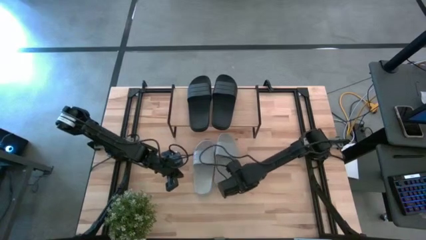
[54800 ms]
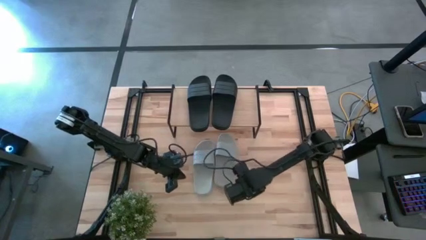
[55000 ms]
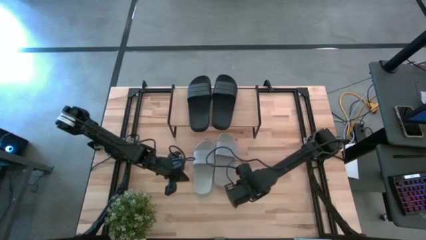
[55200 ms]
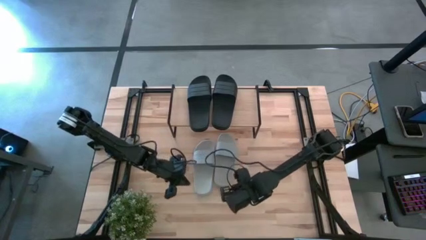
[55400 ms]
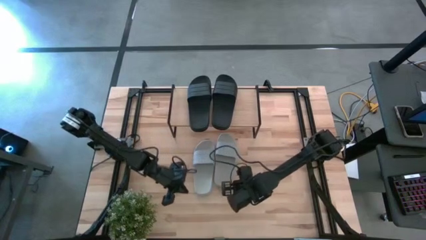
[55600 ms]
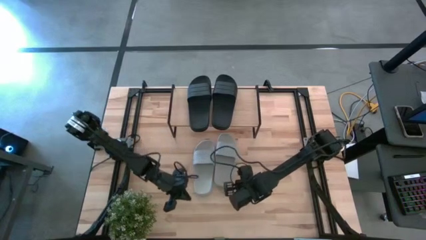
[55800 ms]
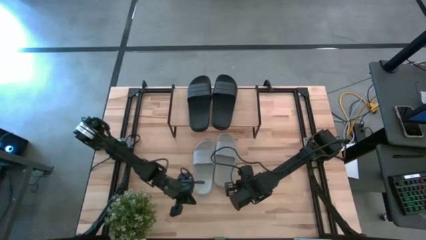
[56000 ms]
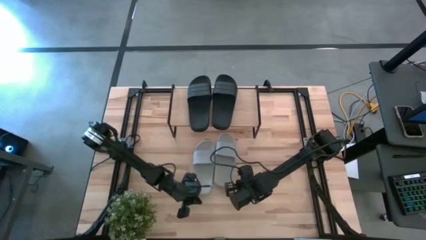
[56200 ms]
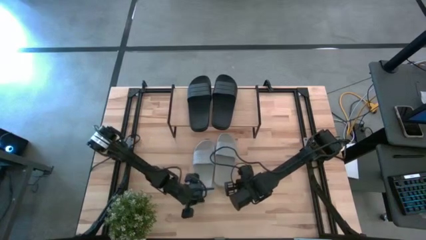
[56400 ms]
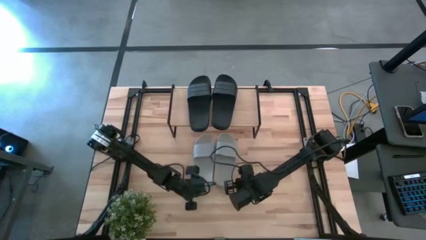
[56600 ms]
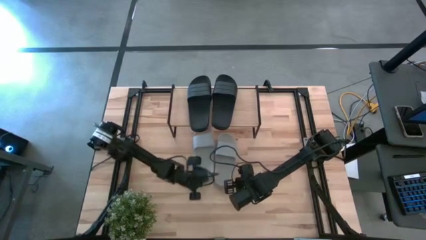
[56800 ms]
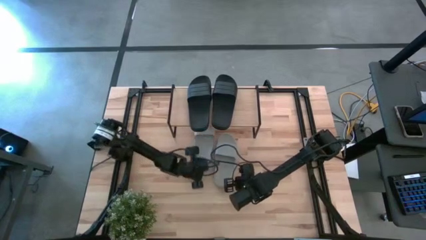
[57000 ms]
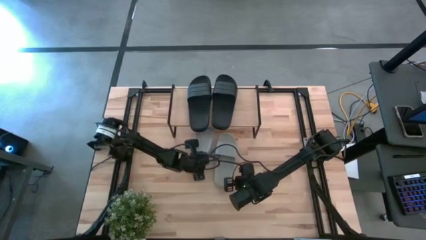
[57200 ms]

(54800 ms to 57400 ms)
Task: Pick and place slides into the shelf
Move the left white slide to the top center of the table

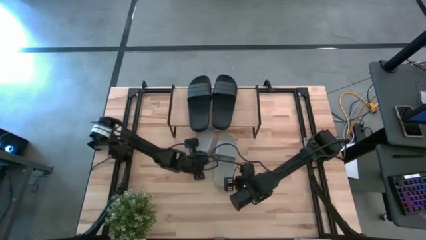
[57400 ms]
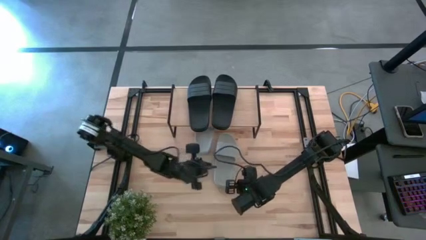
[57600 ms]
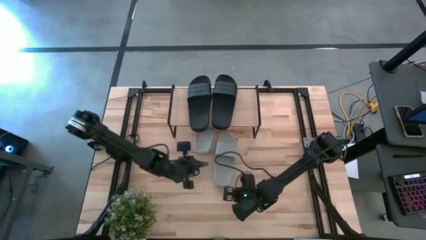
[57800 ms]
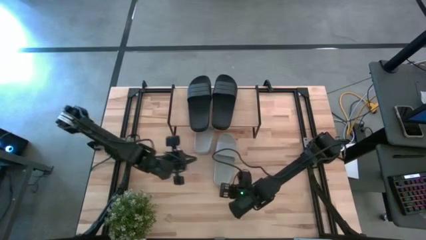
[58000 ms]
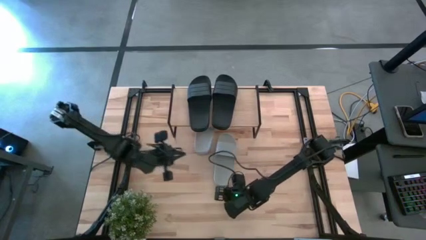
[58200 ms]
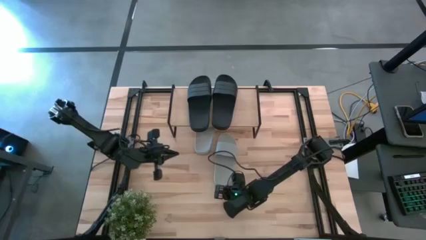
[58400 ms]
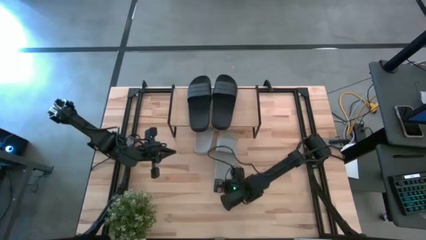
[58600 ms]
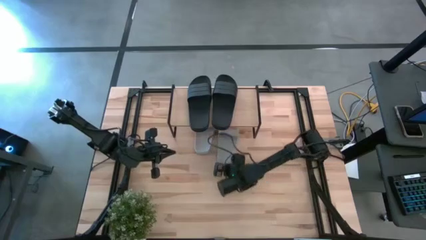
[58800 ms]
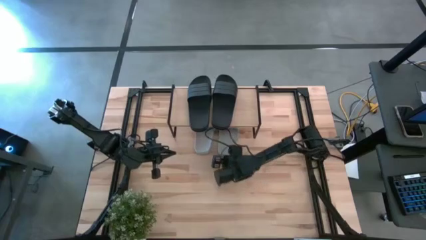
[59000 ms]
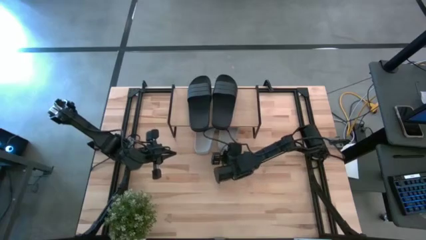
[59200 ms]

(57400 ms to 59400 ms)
Move the right white slide to the top center of the table

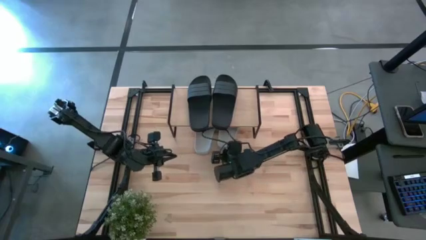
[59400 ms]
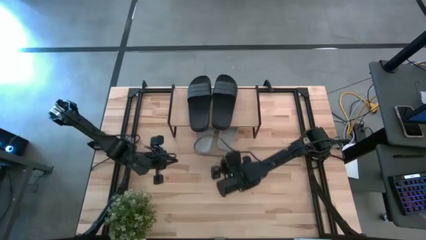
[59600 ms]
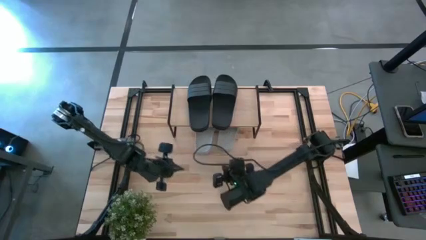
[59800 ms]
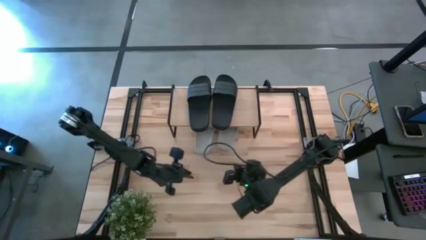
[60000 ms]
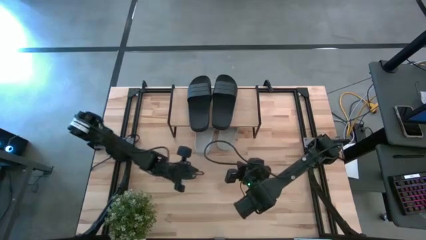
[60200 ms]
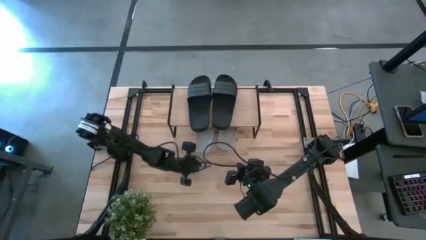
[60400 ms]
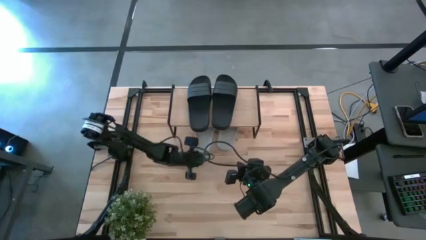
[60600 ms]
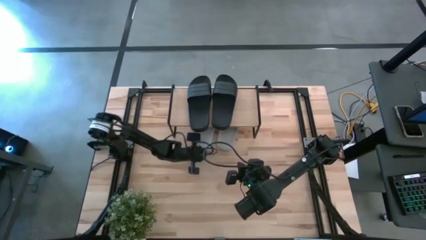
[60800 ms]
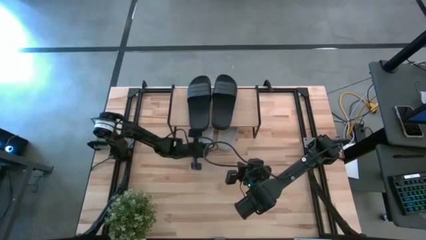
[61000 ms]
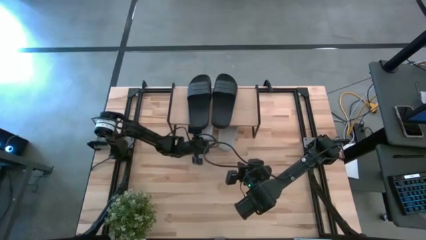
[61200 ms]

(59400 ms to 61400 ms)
Adjust the left white slide under the shelf

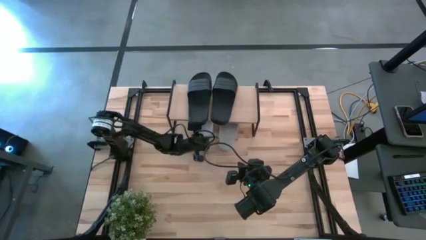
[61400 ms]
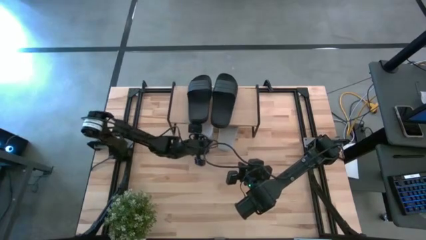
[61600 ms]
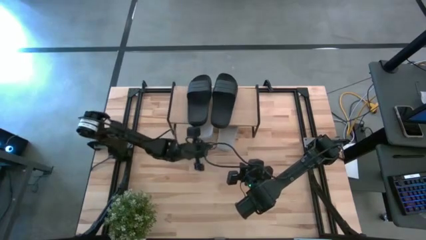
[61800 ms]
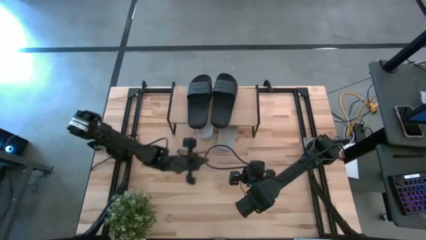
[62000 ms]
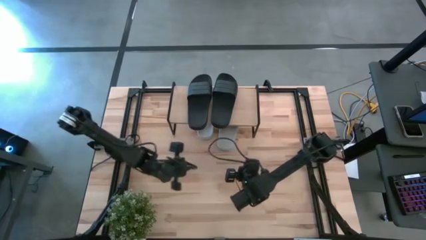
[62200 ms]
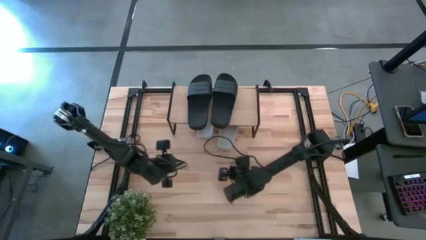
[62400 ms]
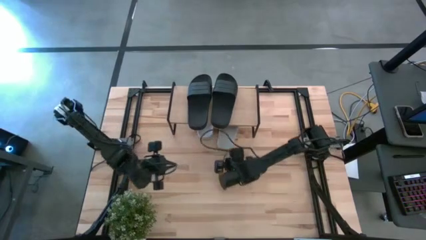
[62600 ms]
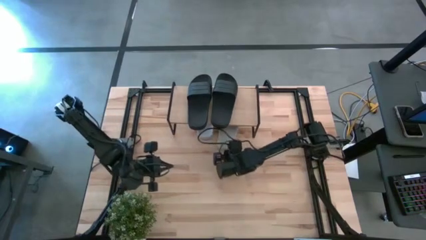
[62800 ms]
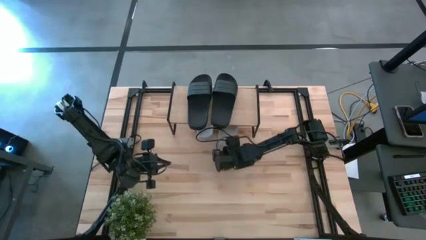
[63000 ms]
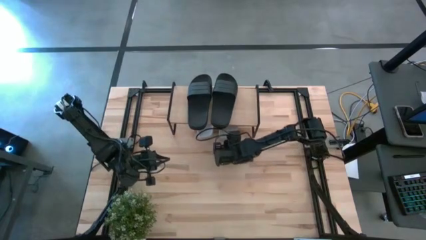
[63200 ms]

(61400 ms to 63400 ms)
Adjust the right white slide under the shelf

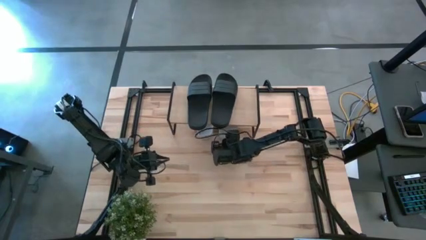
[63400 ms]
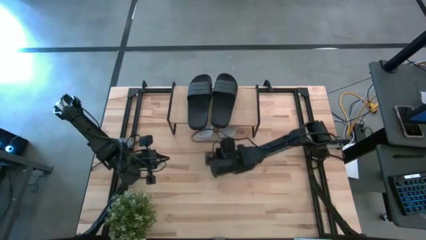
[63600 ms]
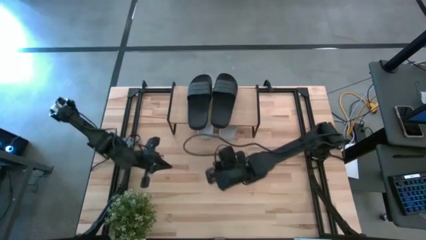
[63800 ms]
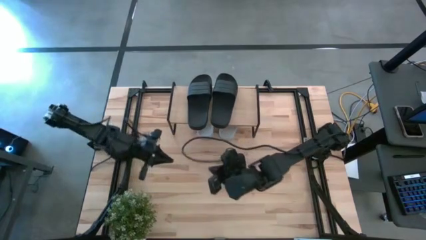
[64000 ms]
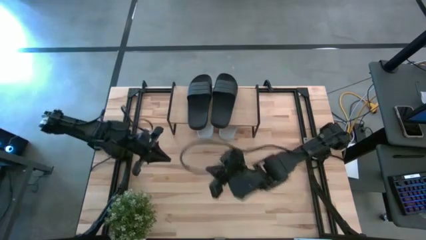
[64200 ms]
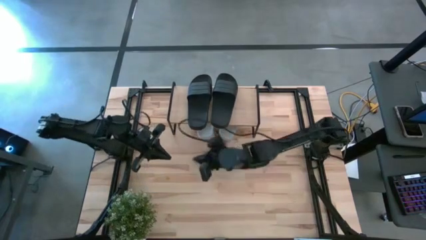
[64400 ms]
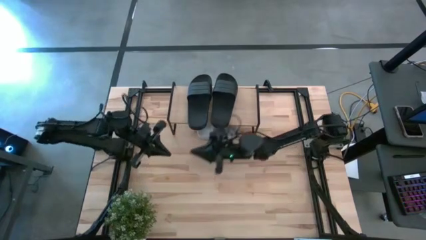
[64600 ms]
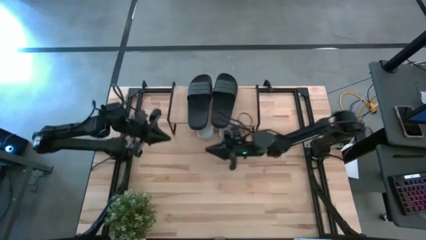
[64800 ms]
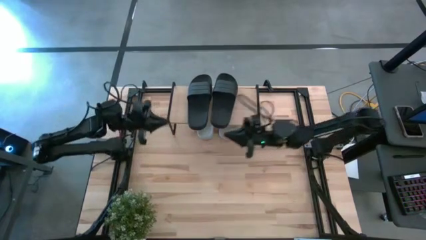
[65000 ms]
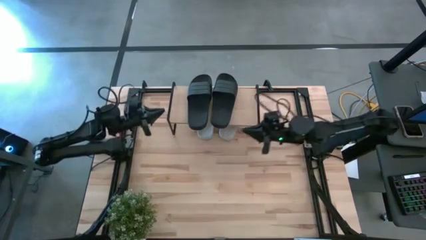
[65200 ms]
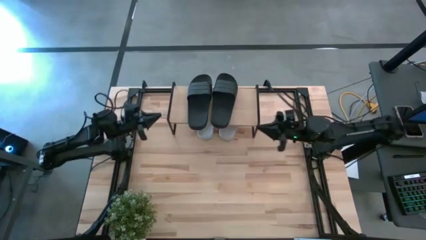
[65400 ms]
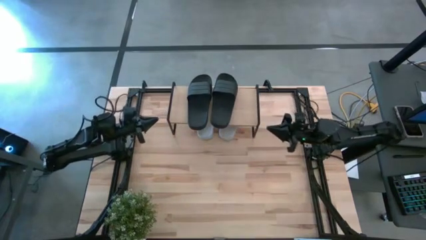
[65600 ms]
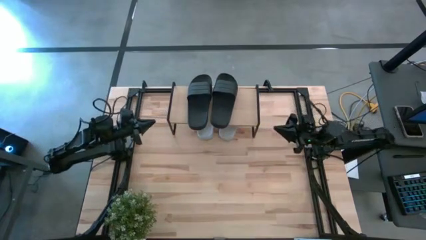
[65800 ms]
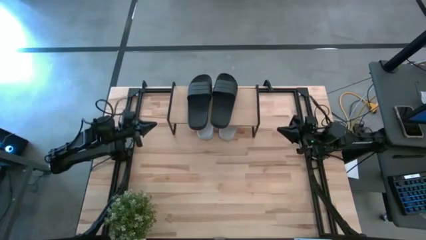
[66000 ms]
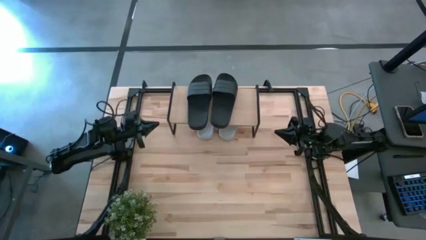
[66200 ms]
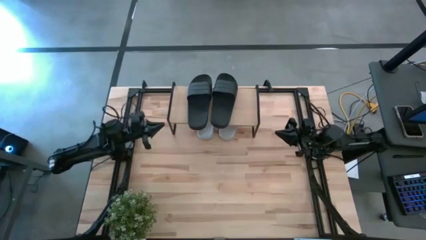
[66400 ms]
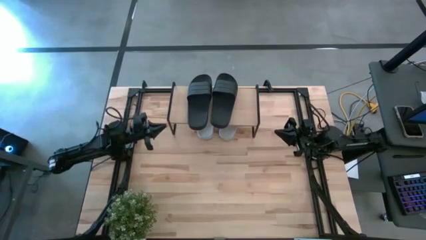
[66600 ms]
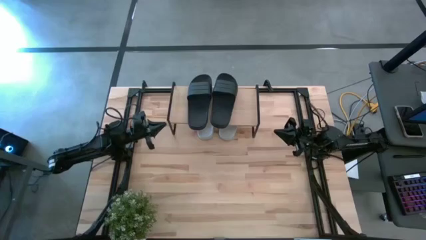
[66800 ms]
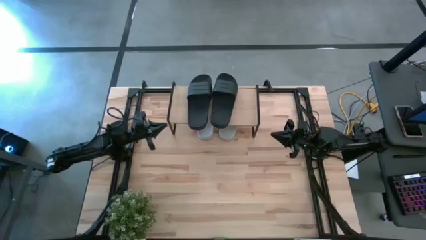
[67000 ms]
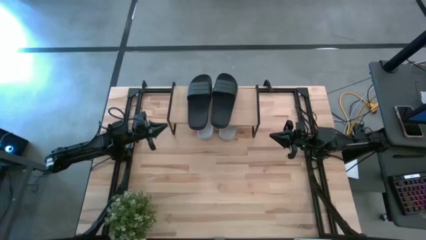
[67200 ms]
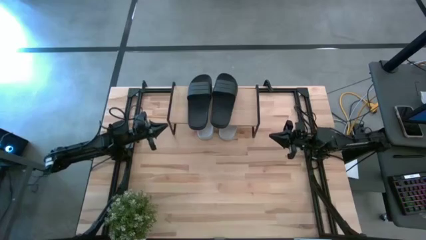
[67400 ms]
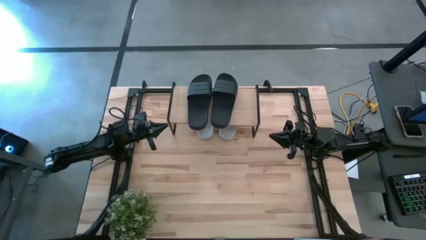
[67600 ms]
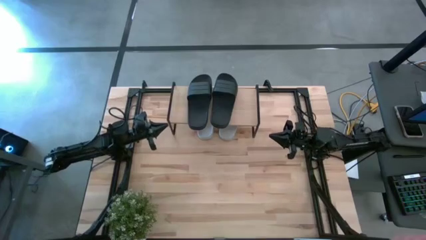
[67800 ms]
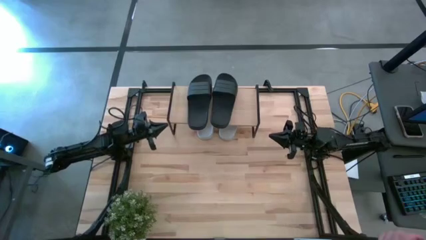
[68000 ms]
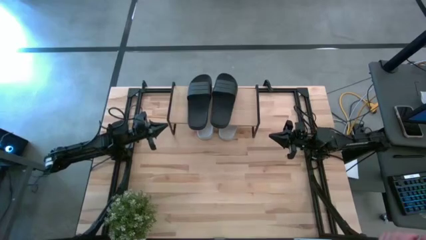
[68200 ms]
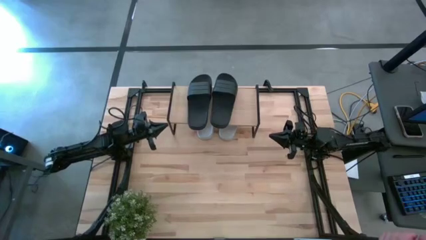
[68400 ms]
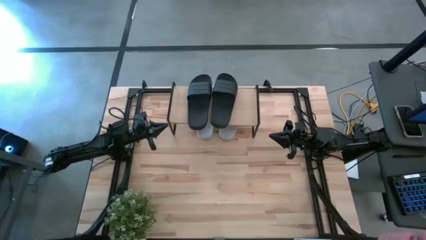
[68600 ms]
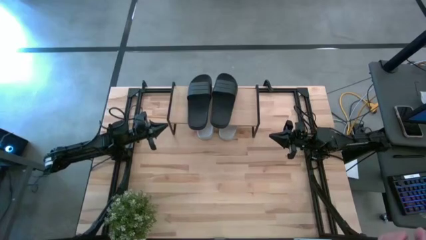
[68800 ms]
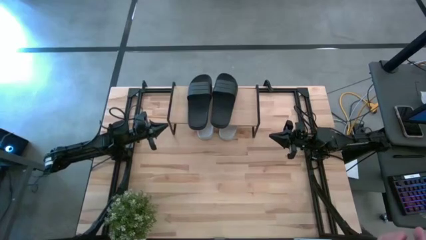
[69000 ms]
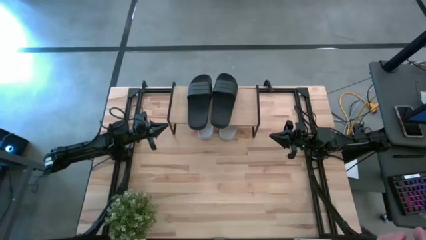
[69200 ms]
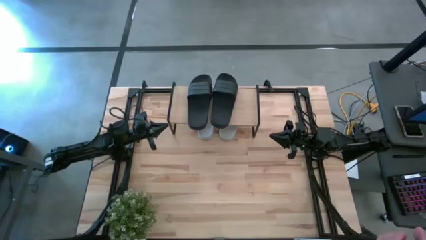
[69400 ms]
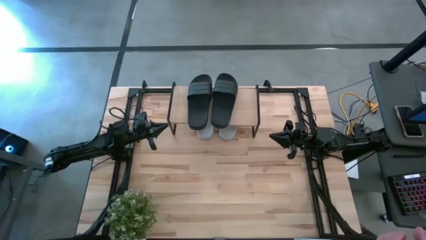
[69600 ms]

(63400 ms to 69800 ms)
Return to Home Position
